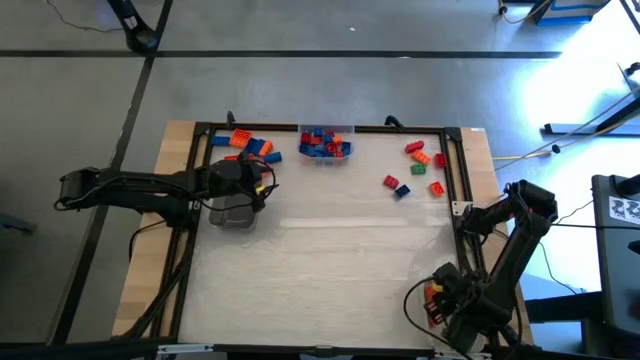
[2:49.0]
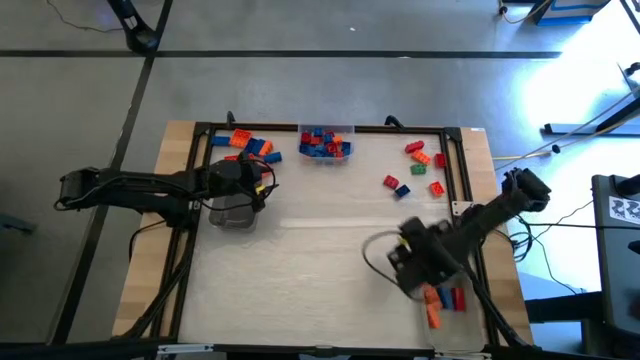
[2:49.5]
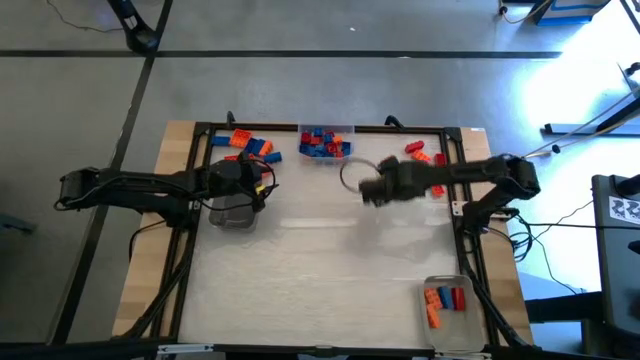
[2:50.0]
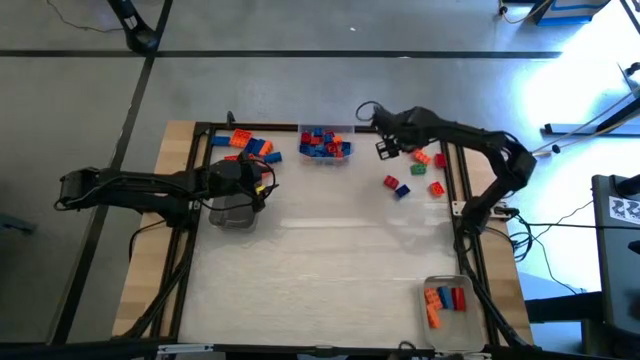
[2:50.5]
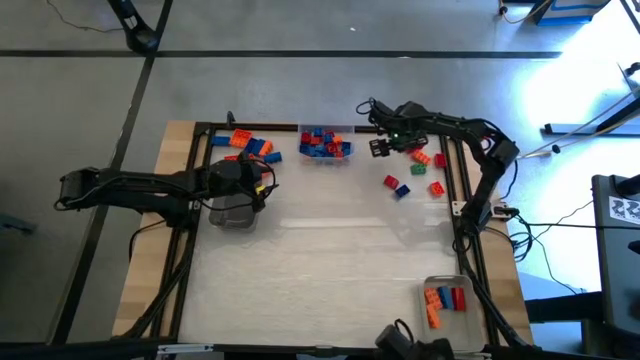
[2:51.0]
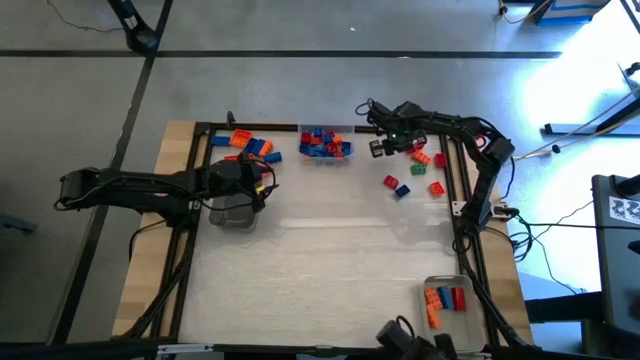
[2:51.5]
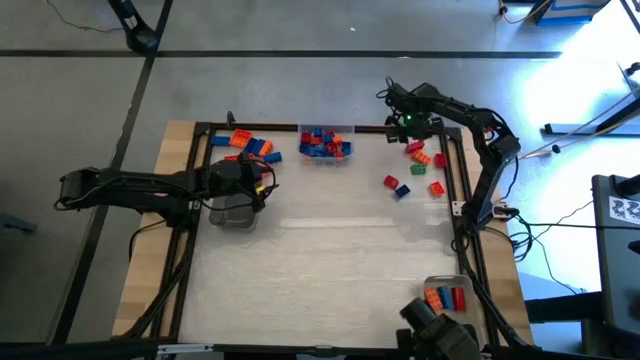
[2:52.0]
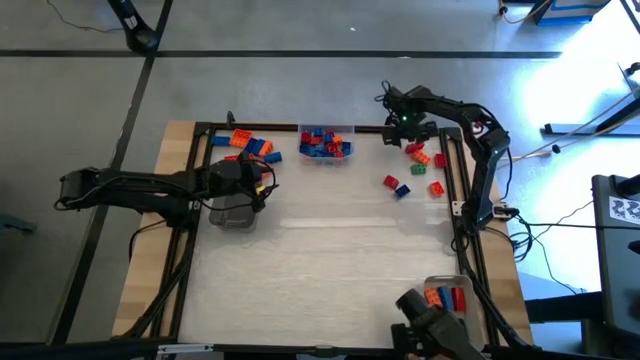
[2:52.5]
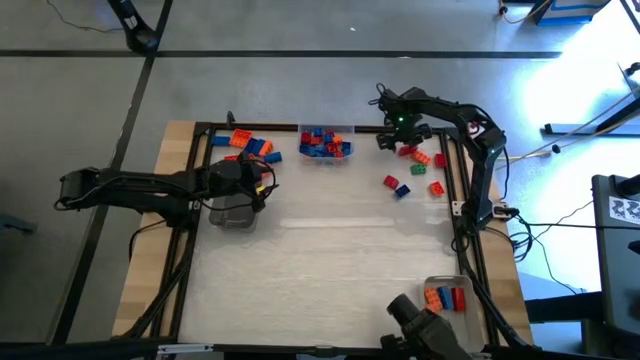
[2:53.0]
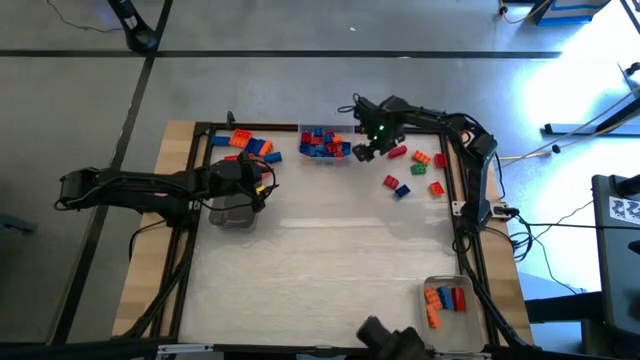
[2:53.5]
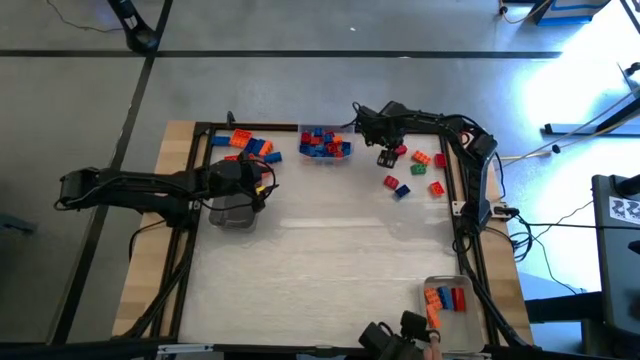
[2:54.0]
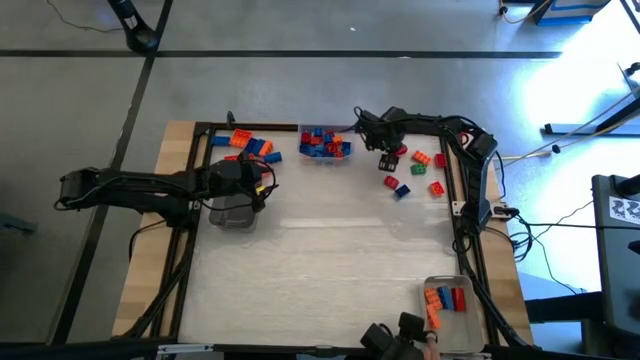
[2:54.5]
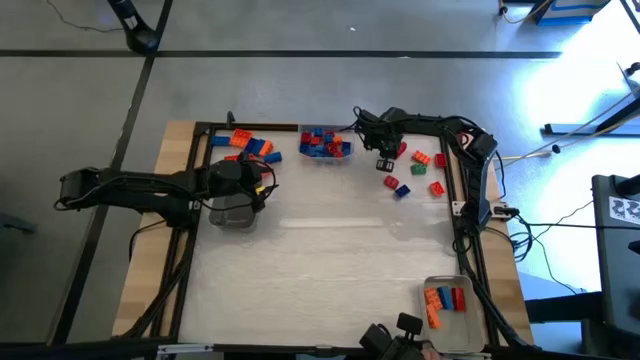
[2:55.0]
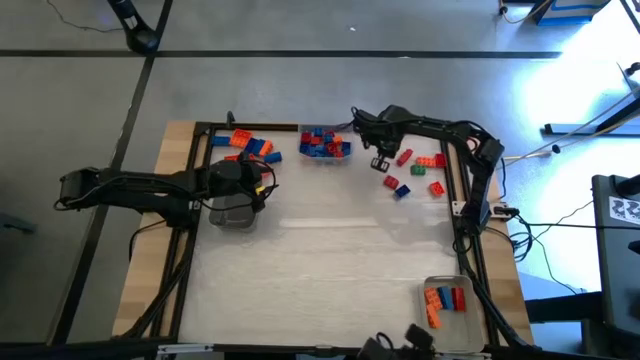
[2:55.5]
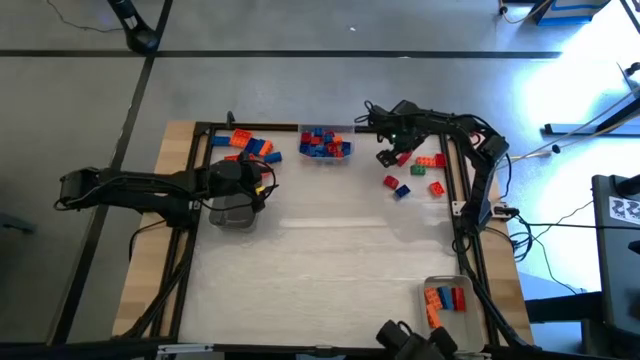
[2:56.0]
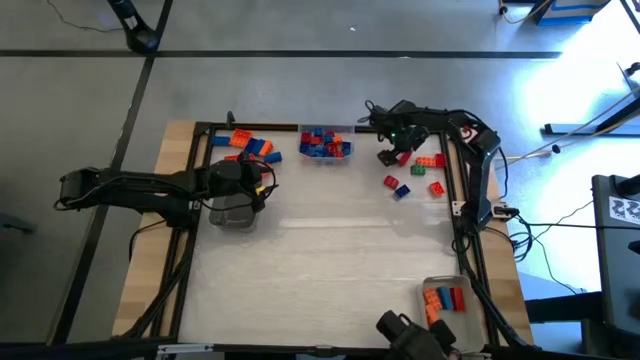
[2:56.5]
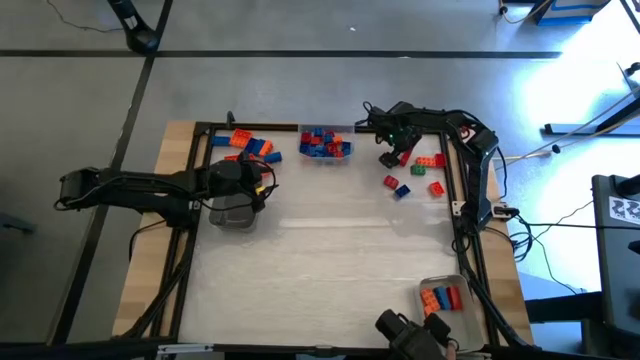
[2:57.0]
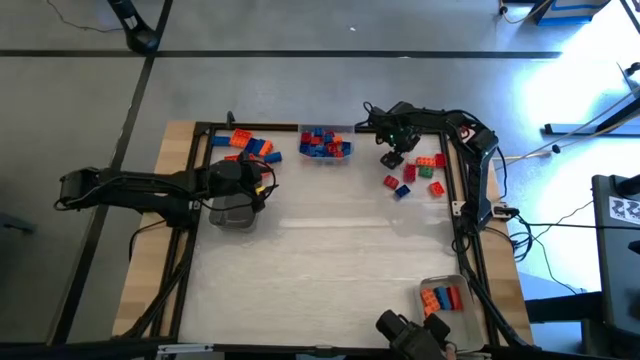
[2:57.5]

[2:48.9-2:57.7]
Task: Sort blocks by size
Put the red 8 stud game piece into the gray bin

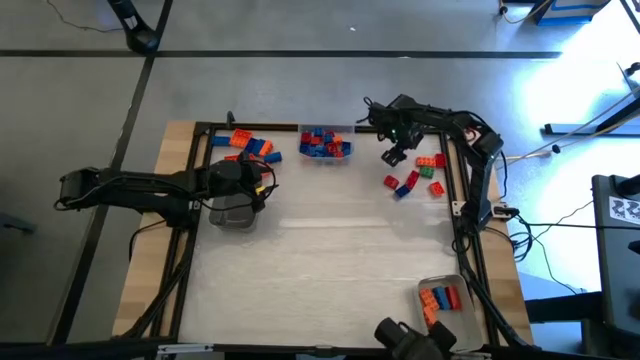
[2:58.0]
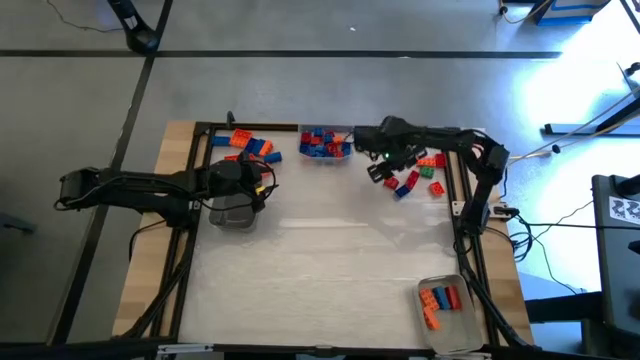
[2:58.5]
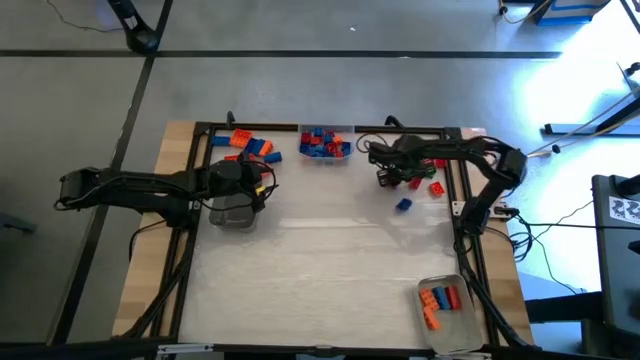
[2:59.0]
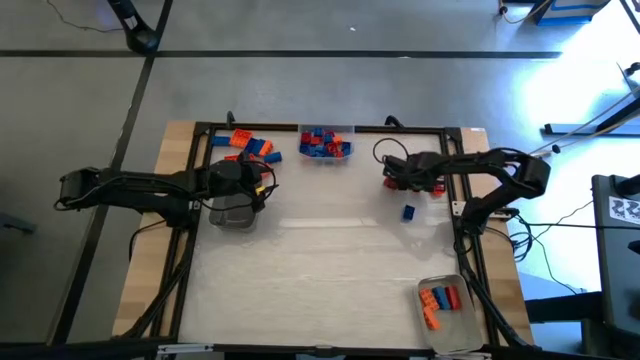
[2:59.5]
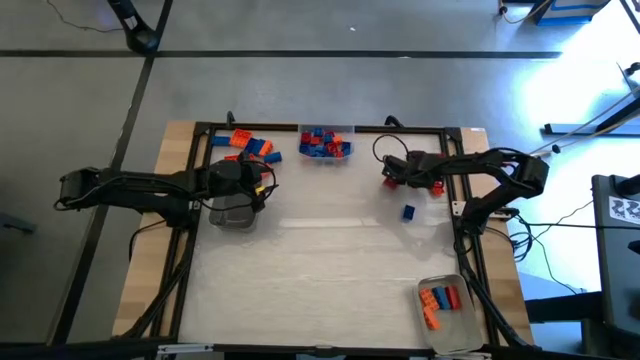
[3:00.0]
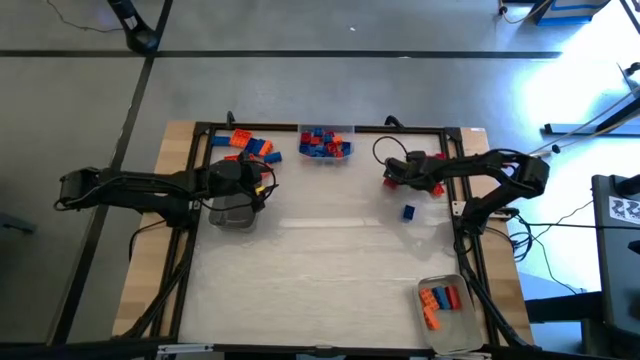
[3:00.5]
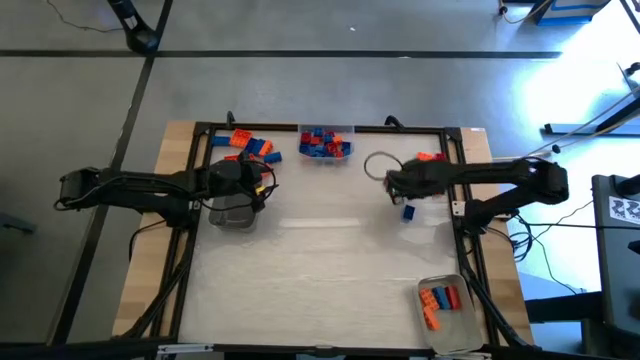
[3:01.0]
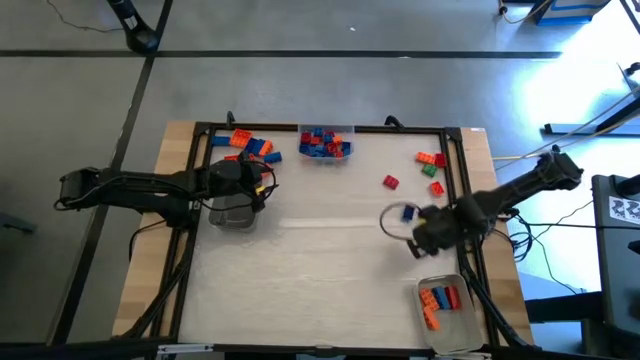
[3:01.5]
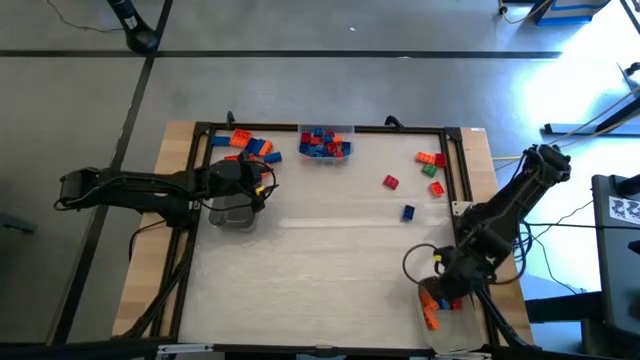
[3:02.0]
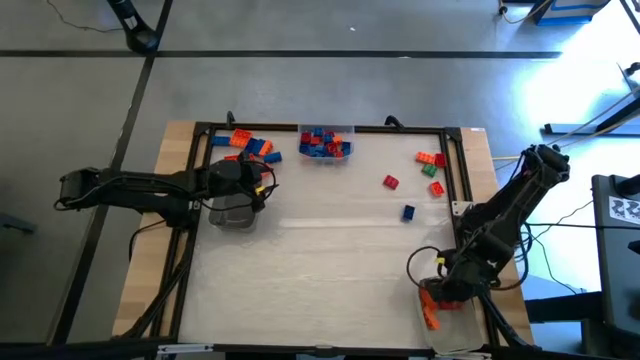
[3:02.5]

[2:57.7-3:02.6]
Put the red 8 stud game piece into the gray bin

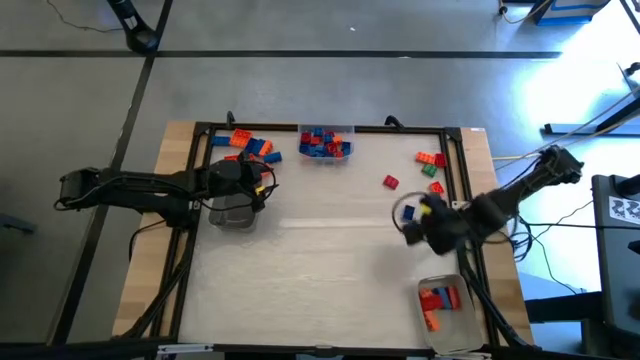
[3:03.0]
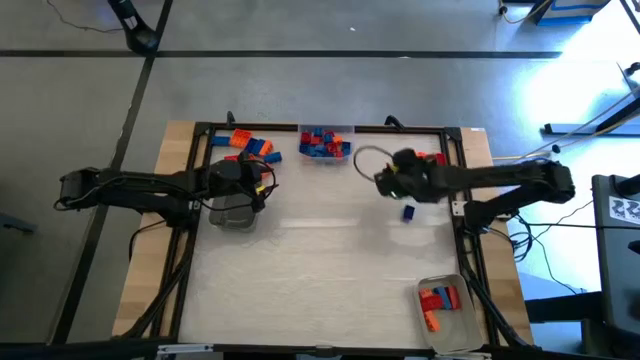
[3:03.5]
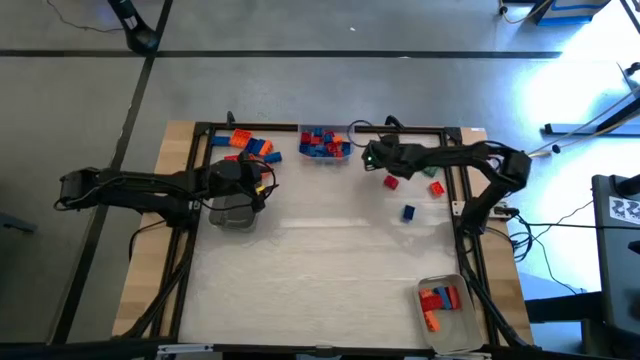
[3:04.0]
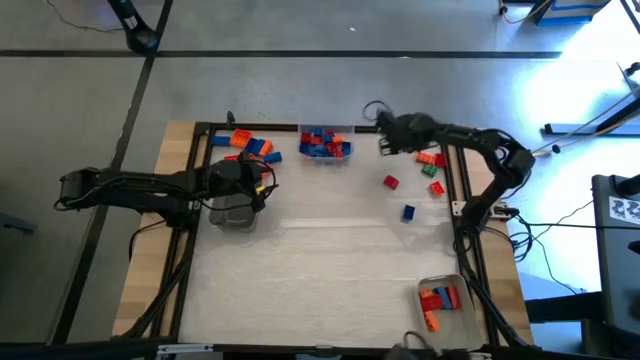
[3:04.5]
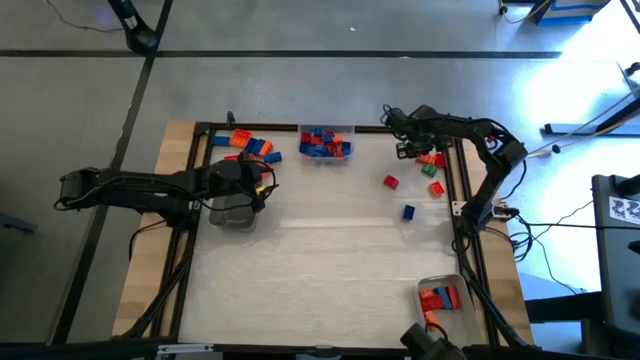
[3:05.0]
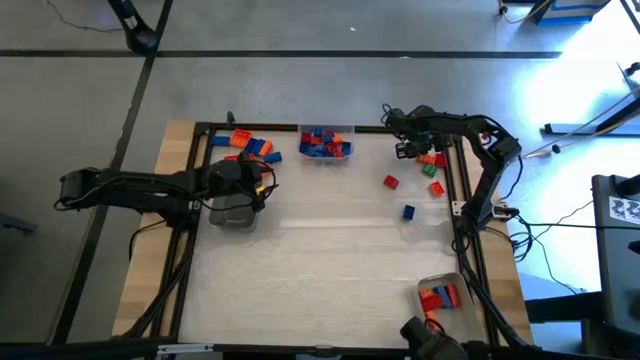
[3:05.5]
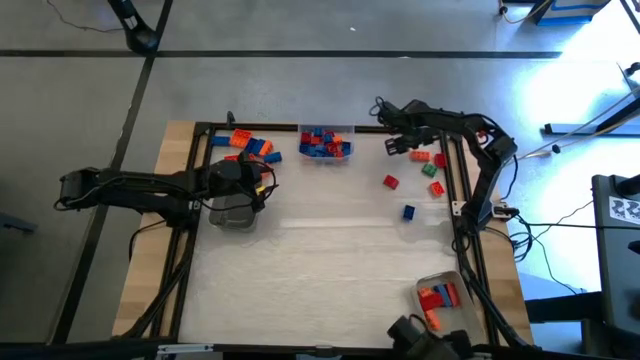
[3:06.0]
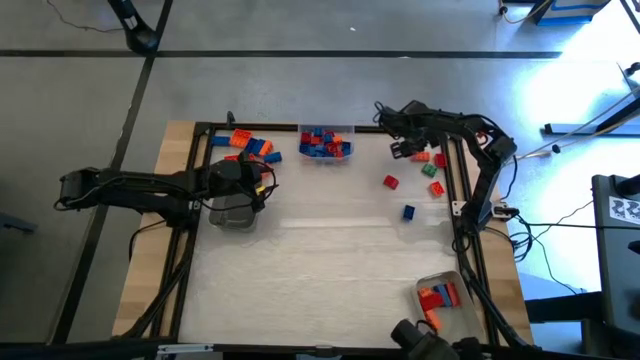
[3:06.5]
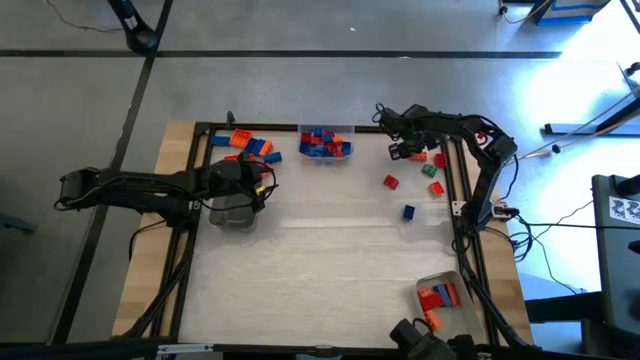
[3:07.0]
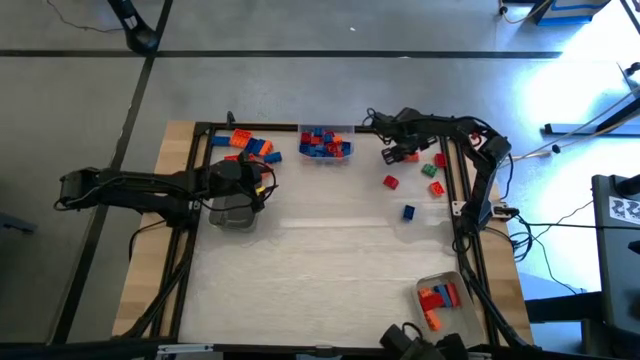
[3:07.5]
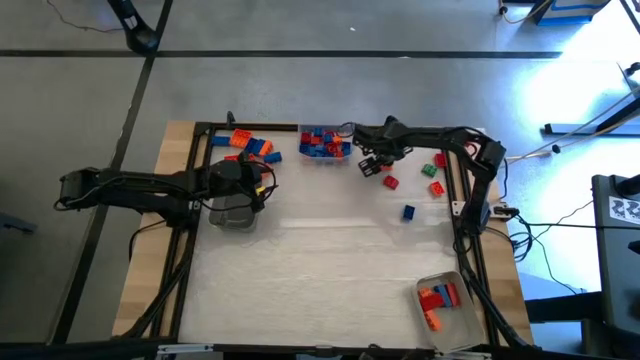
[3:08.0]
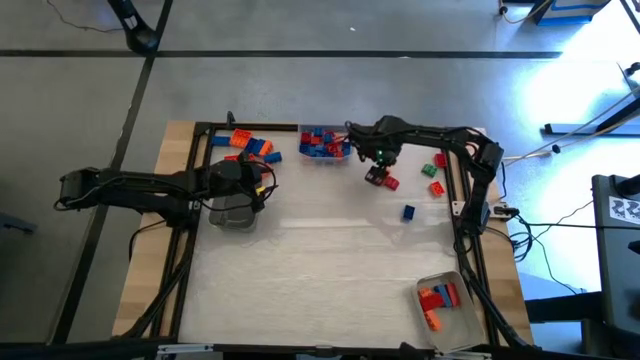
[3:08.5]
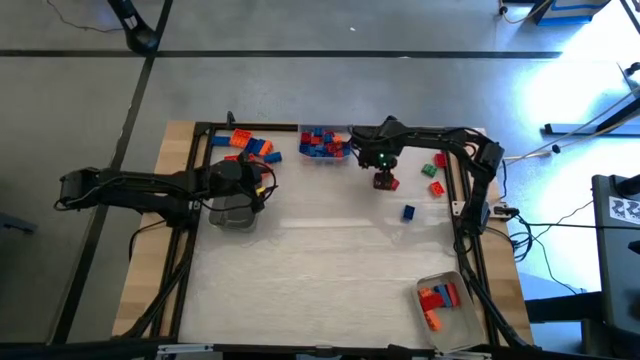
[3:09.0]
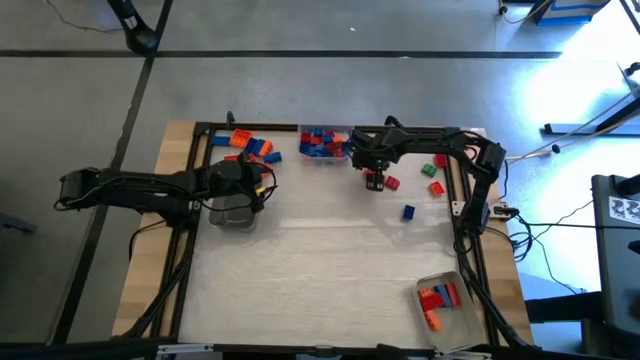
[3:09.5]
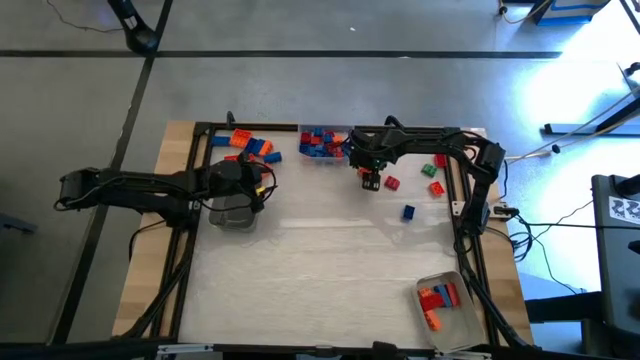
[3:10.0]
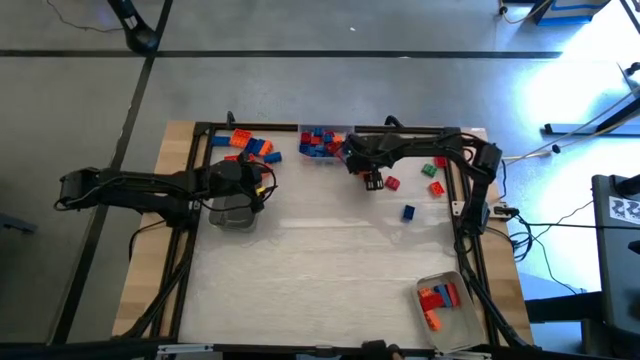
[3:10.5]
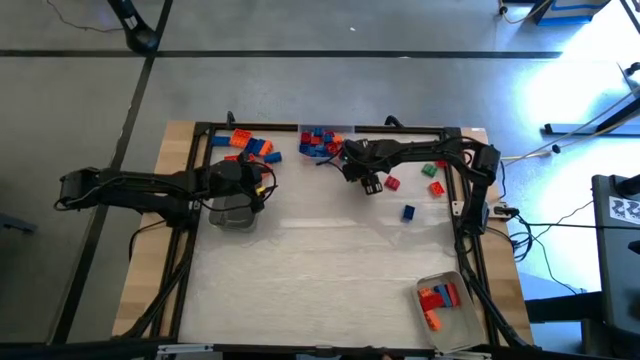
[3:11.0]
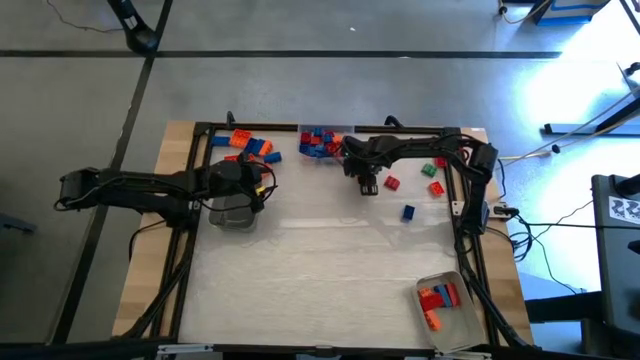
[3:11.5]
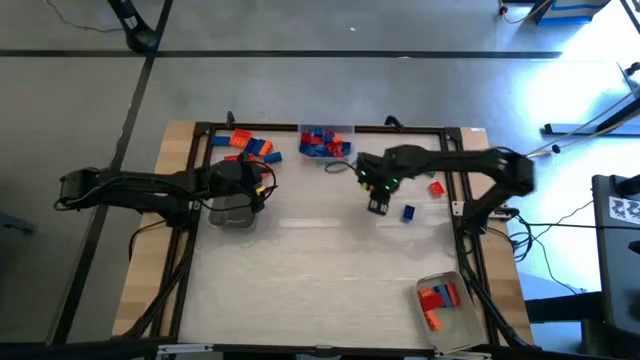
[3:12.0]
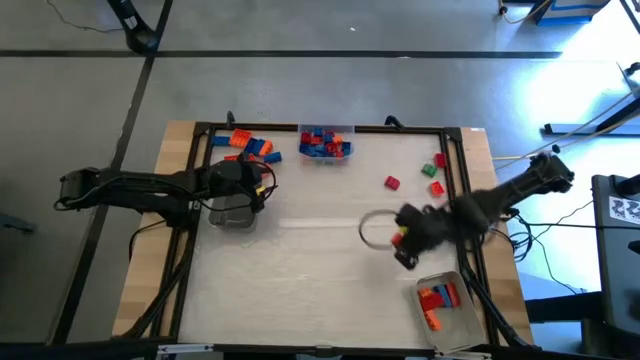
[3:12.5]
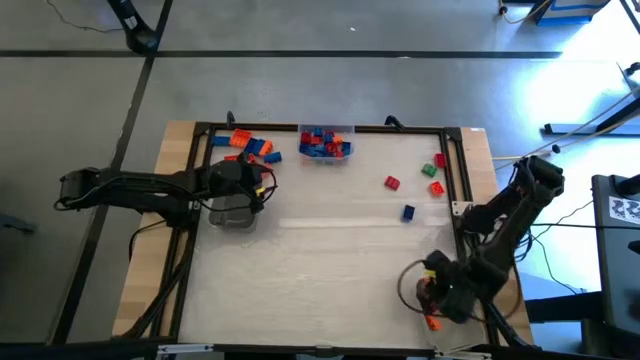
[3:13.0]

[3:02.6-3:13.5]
Put the orange 8 stud game piece into the gray bin
